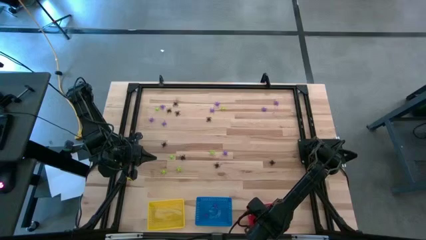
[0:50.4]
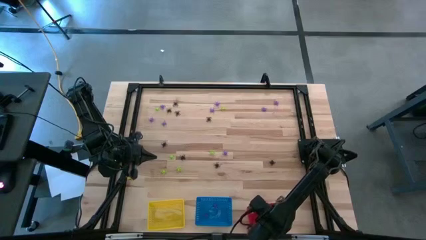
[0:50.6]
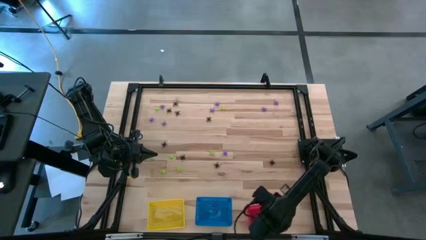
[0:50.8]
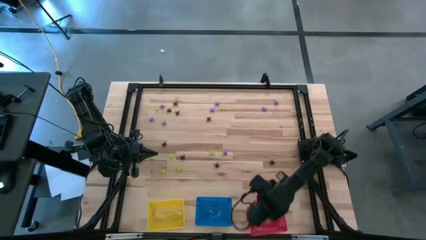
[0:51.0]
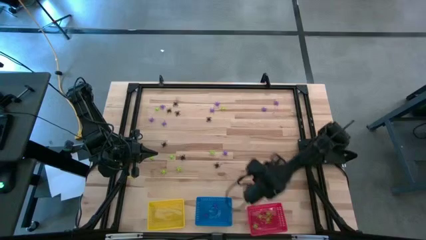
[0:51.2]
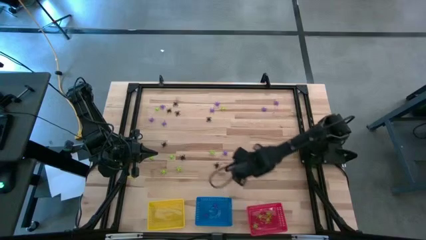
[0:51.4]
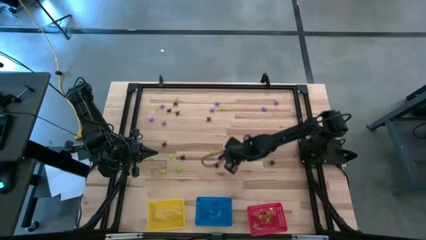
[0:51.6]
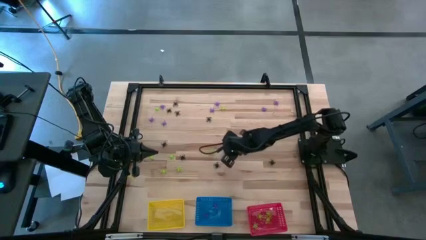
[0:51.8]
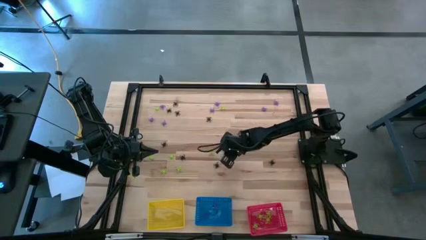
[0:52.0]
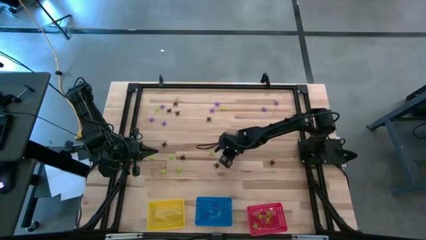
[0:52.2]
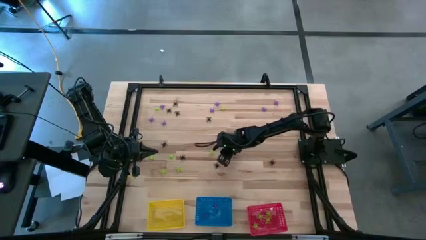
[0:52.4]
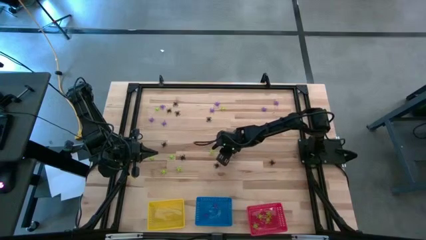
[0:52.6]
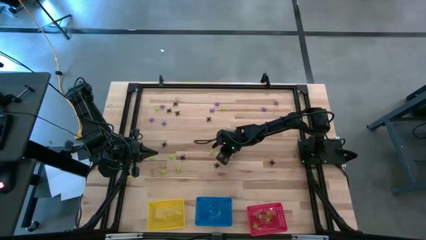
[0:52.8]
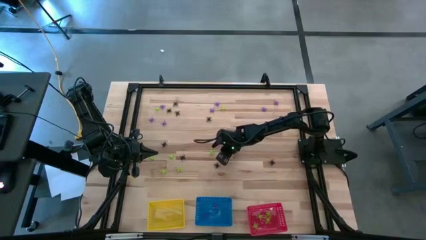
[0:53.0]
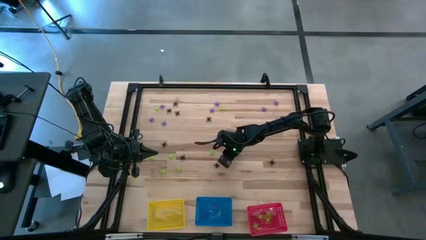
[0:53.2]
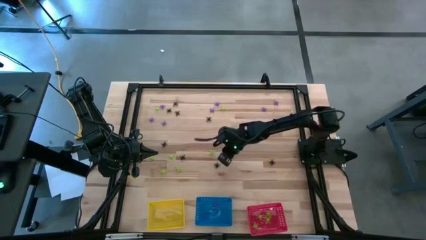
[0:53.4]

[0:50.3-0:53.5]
Task: Sort Halloween decoration
Put the violet spider toy into the blue bin

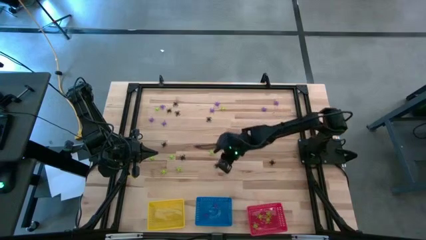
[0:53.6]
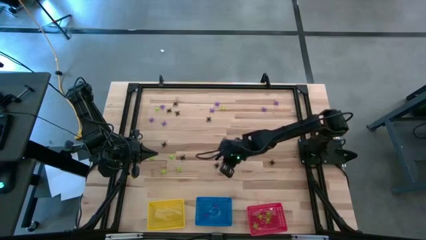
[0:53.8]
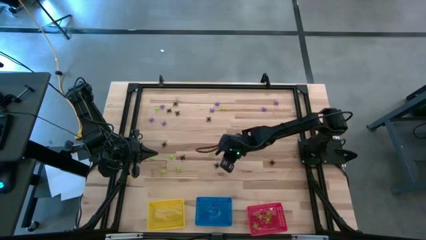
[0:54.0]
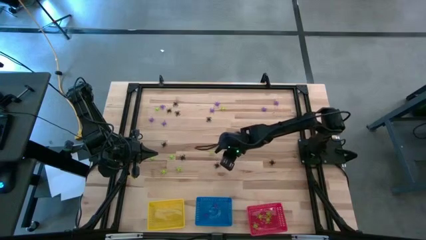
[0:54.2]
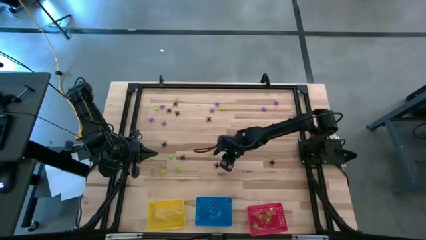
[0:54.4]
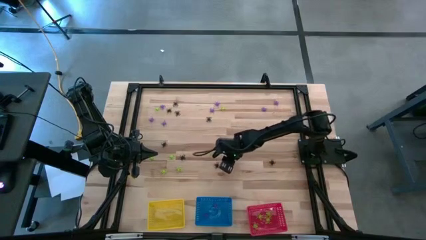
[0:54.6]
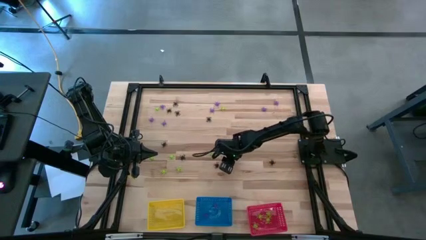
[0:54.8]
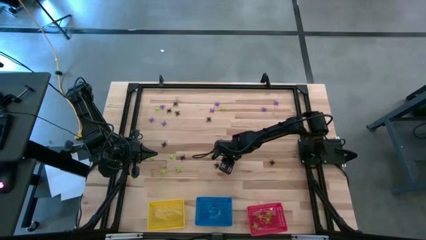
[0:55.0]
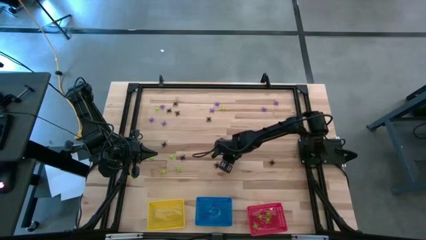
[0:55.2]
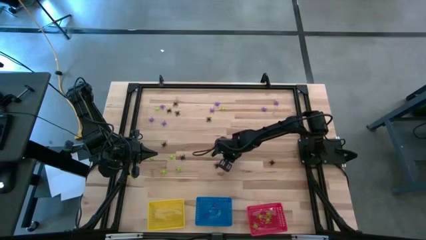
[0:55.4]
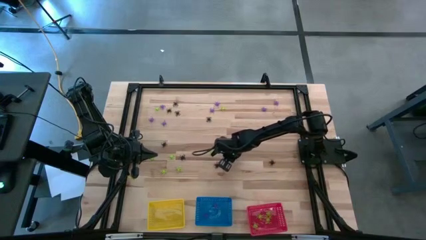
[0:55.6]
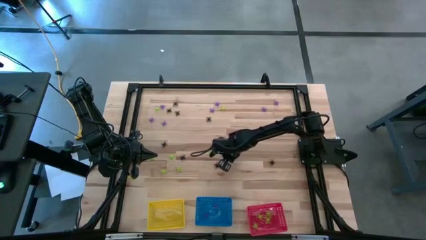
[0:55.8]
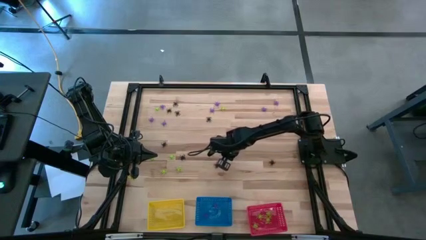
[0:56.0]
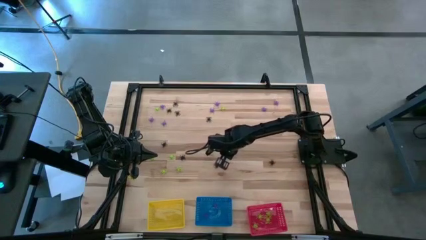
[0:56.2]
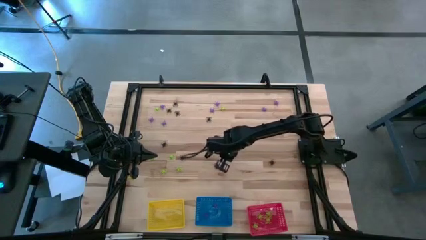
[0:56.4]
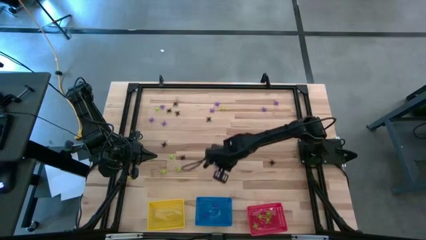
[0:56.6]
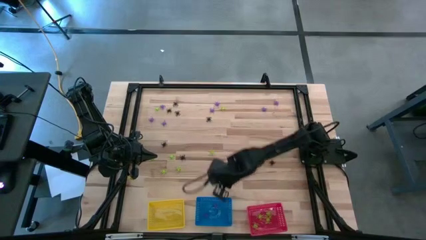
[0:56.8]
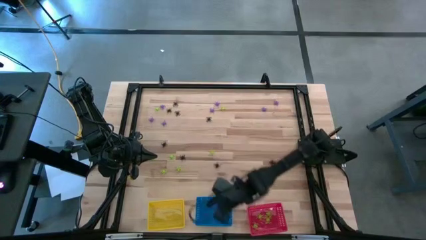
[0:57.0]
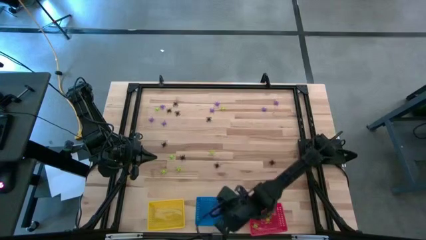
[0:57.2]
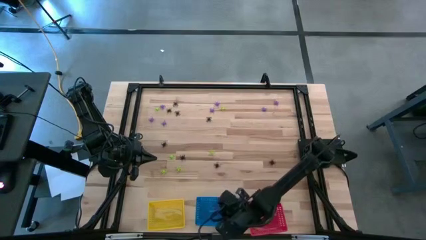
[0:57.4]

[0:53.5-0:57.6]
Put the violet spider toy into the blue bin

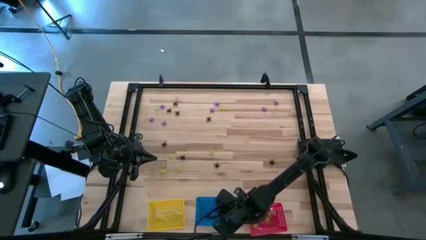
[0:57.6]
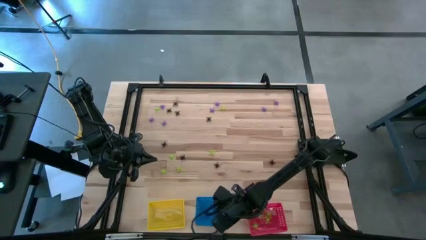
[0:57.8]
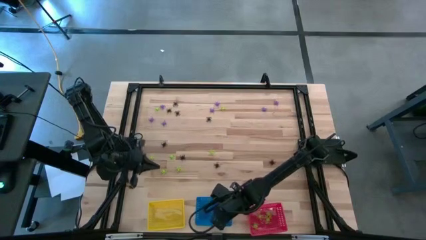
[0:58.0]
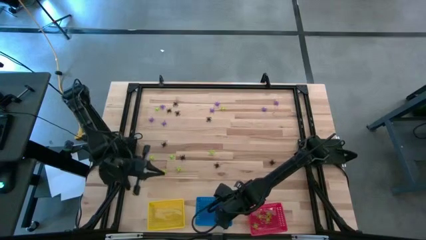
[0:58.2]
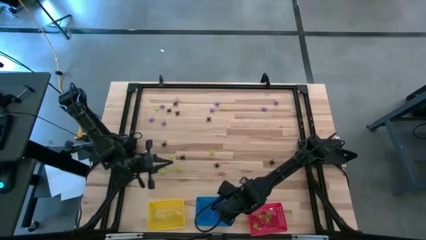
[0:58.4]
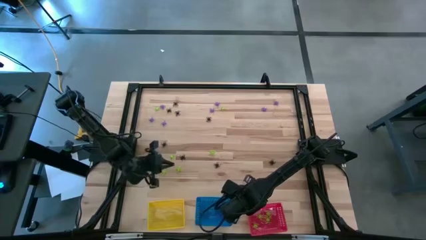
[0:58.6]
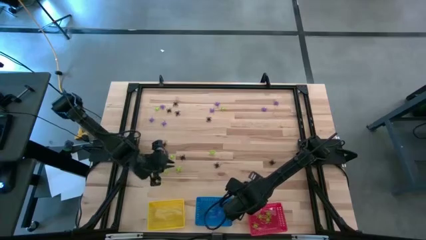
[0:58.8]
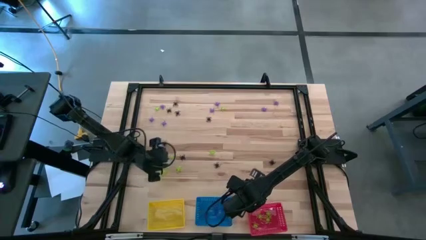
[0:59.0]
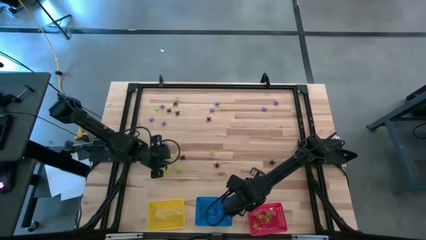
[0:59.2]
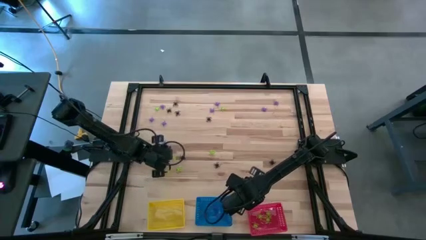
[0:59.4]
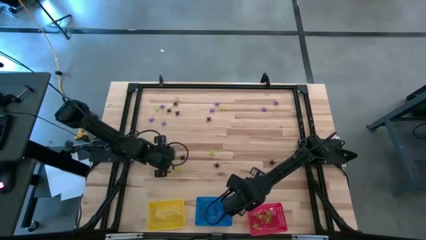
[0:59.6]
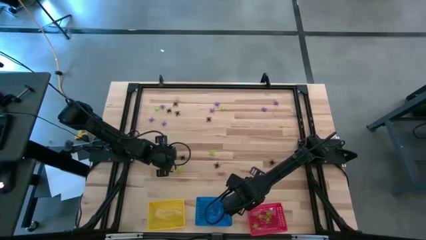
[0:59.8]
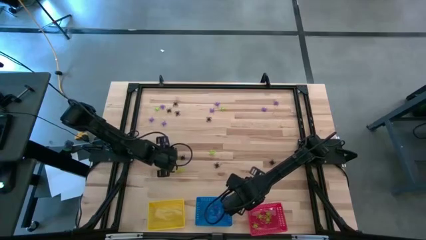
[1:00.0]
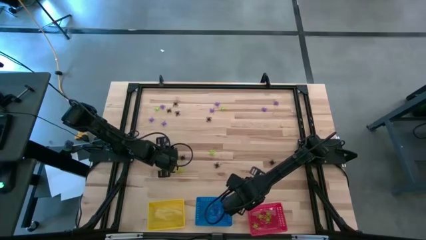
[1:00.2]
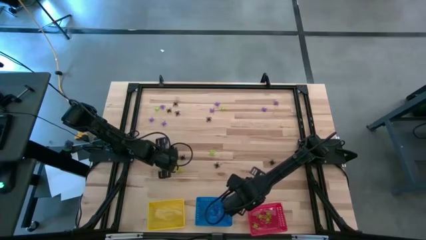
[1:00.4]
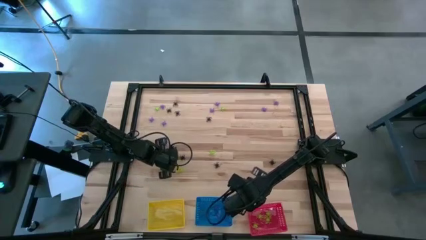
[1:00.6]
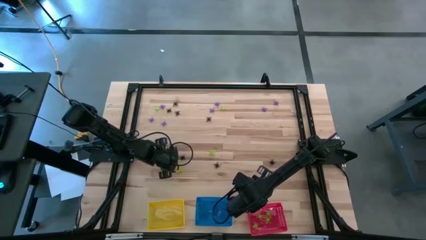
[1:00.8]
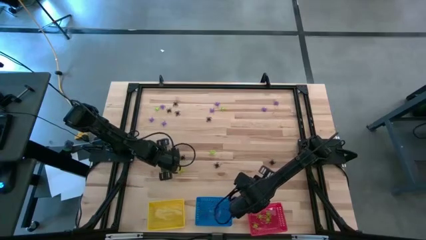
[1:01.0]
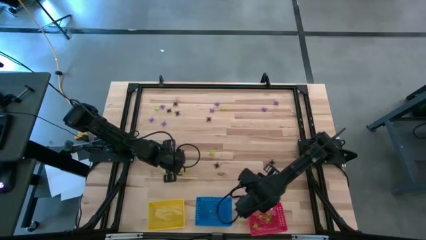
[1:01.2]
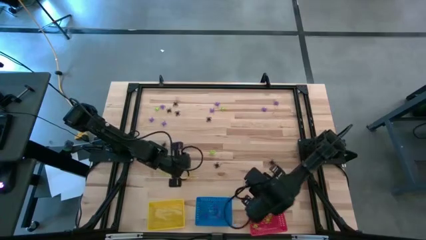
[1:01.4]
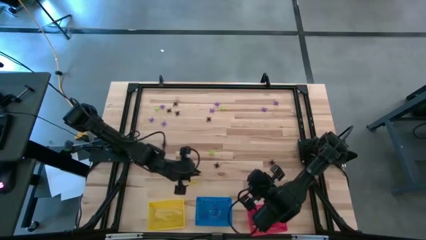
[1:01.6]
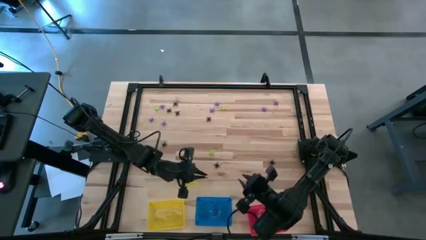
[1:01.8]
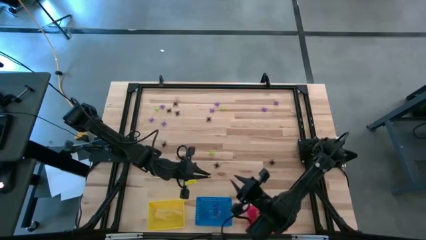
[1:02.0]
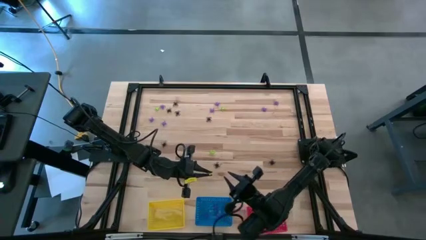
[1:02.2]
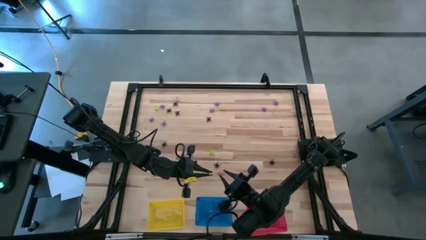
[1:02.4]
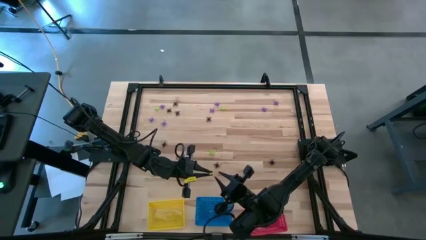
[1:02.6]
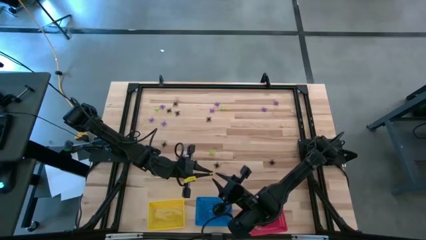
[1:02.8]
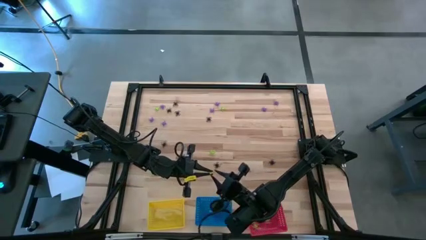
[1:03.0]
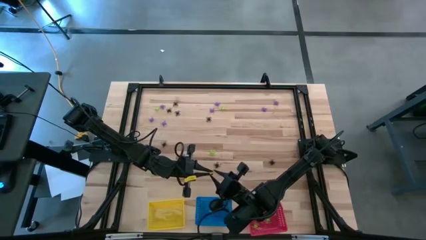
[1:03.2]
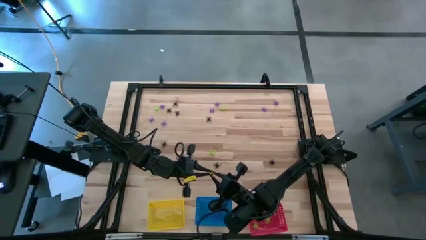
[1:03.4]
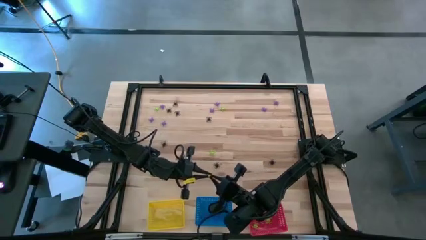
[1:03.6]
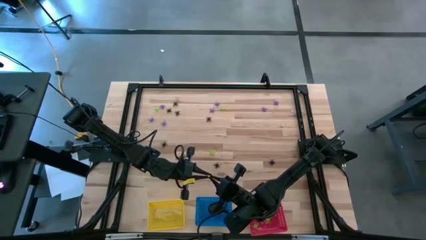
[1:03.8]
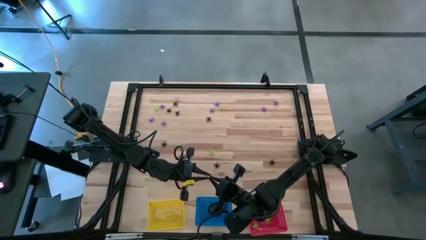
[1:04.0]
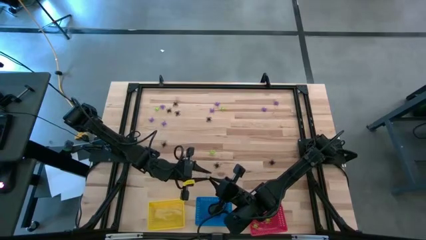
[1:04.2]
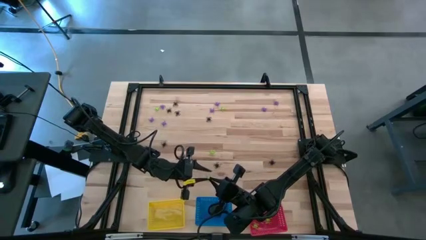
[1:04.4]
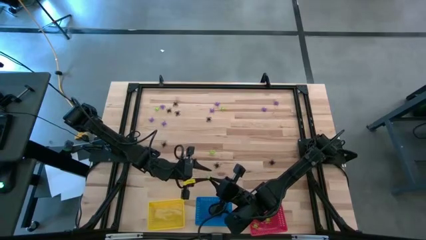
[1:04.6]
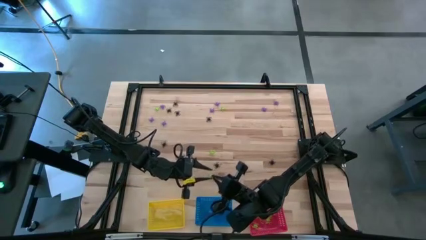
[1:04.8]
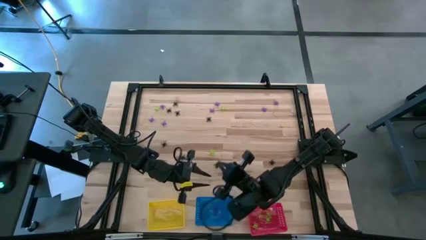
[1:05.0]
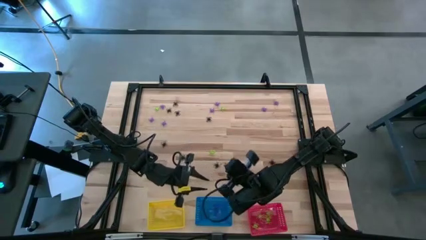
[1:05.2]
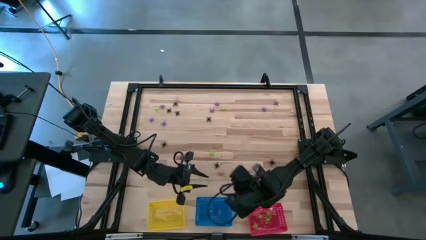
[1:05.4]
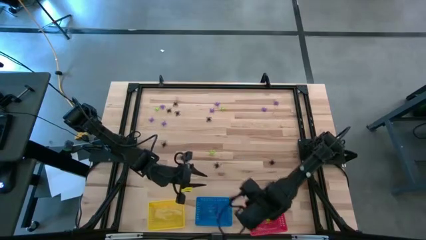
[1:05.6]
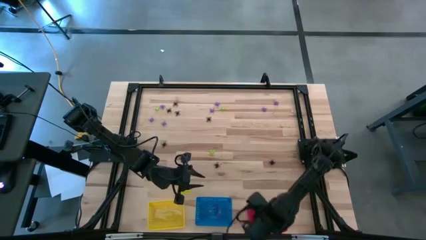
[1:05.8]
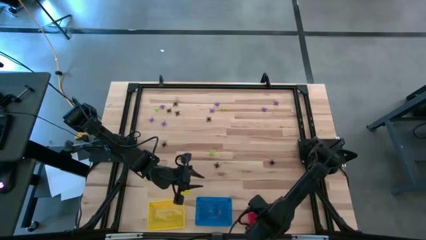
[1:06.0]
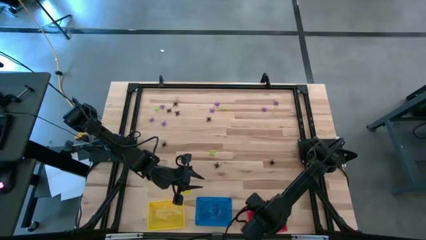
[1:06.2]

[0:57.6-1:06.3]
Put the green spider toy into the red bin
